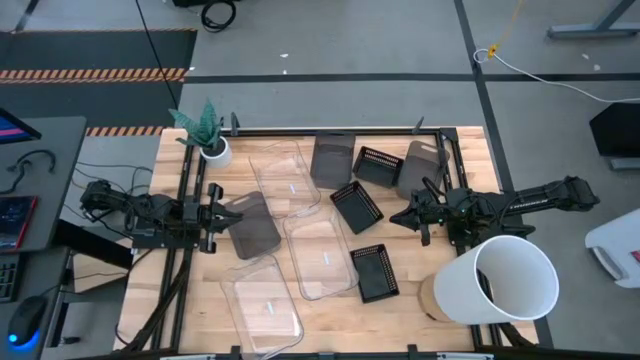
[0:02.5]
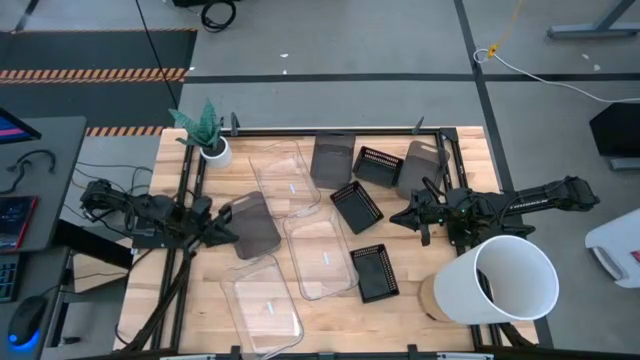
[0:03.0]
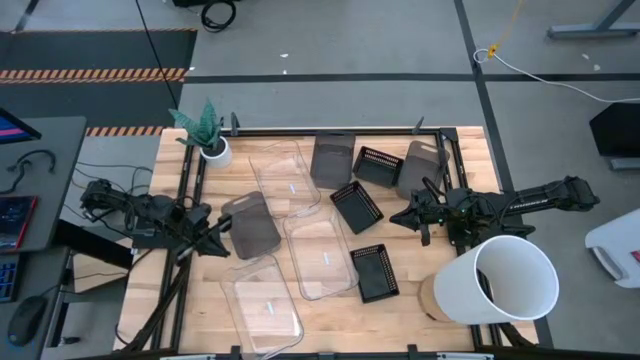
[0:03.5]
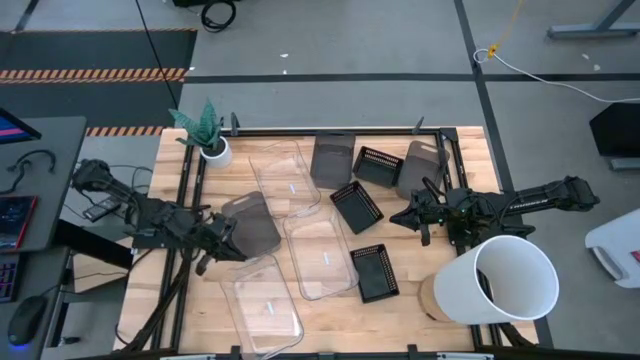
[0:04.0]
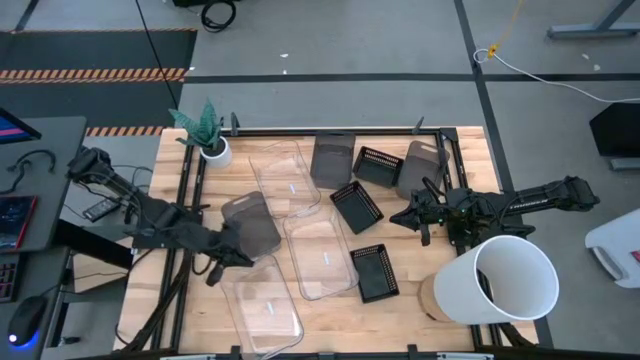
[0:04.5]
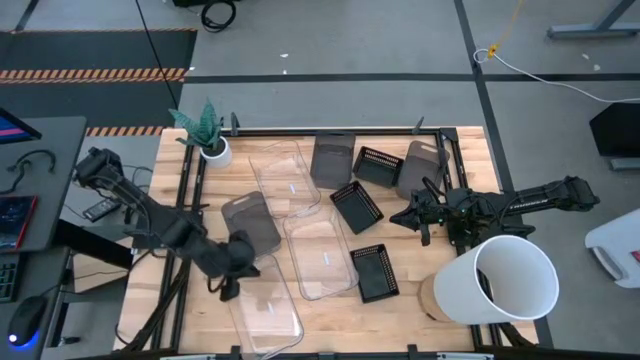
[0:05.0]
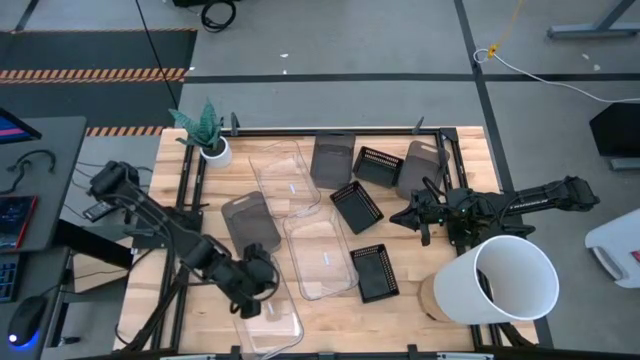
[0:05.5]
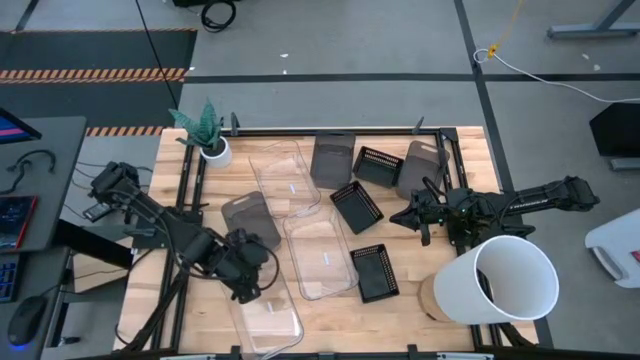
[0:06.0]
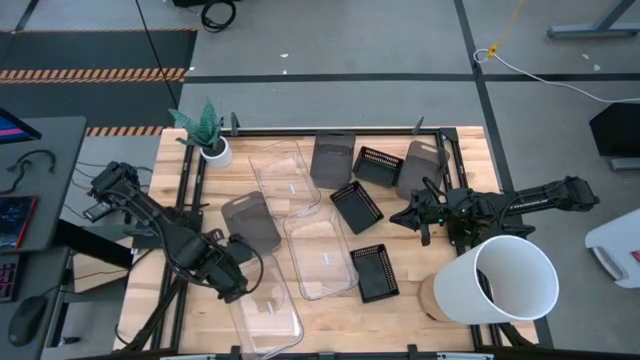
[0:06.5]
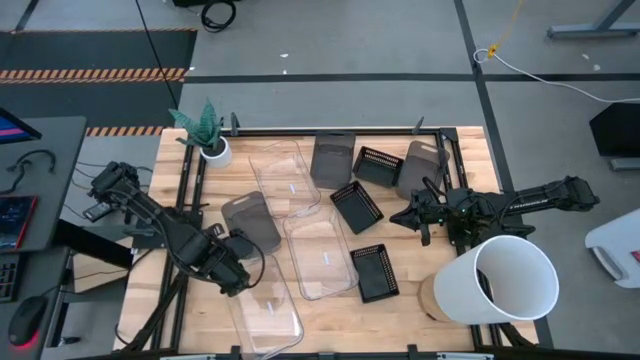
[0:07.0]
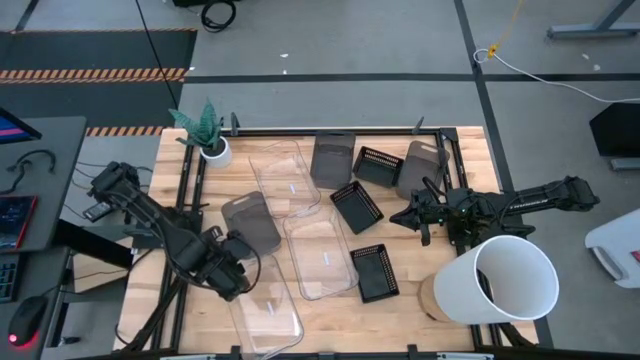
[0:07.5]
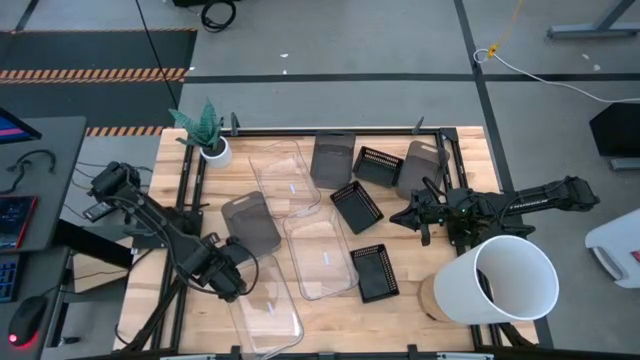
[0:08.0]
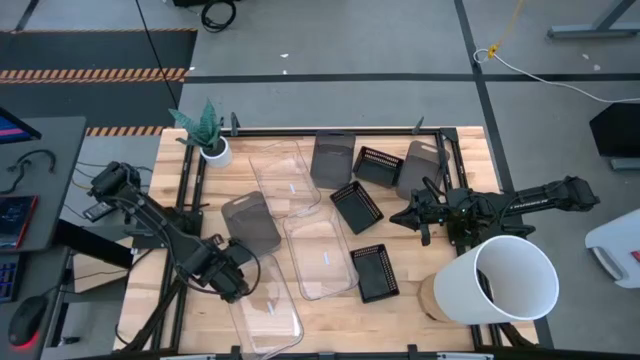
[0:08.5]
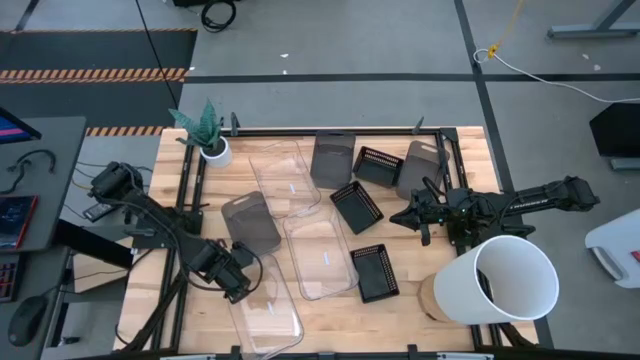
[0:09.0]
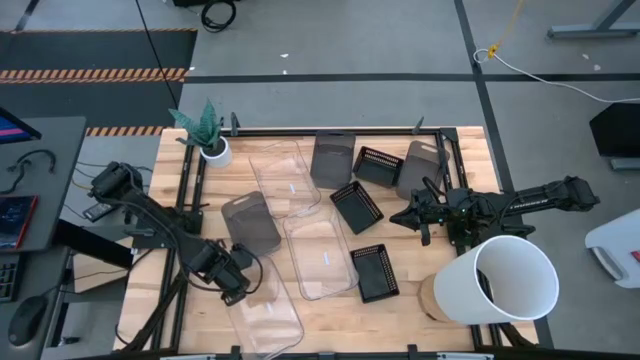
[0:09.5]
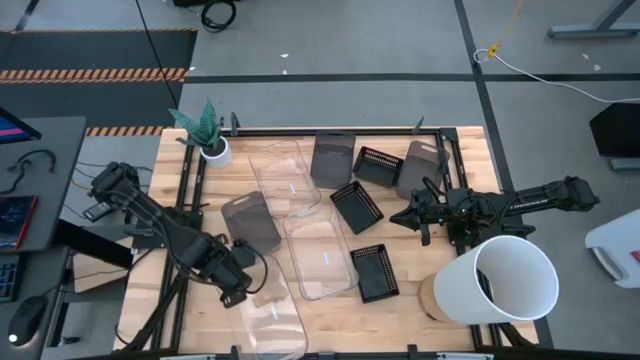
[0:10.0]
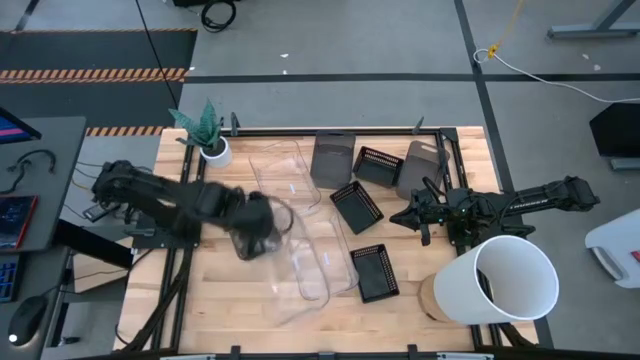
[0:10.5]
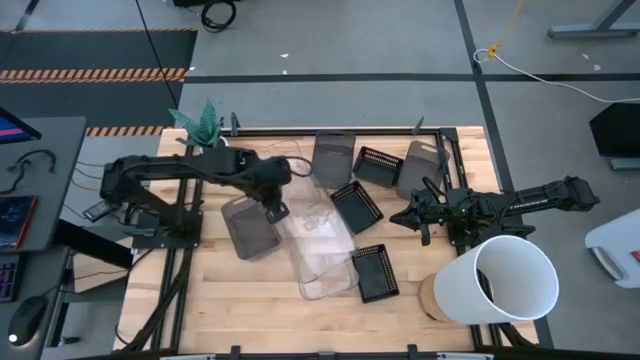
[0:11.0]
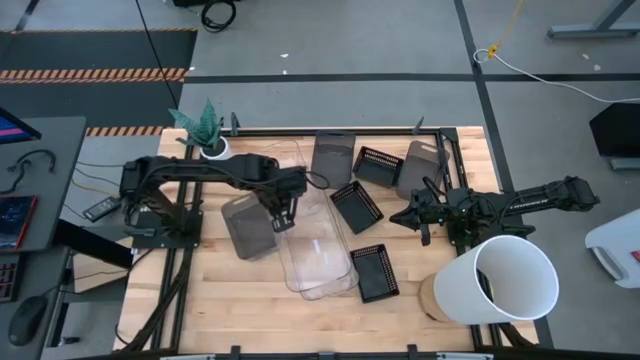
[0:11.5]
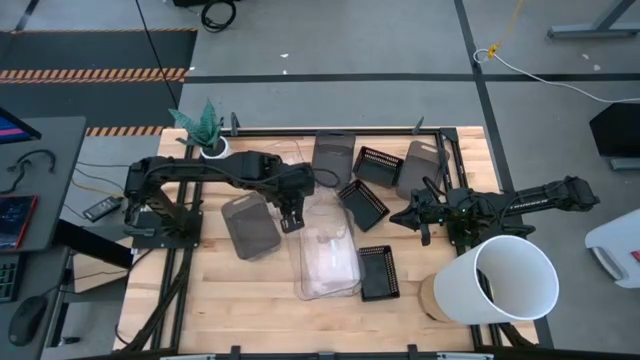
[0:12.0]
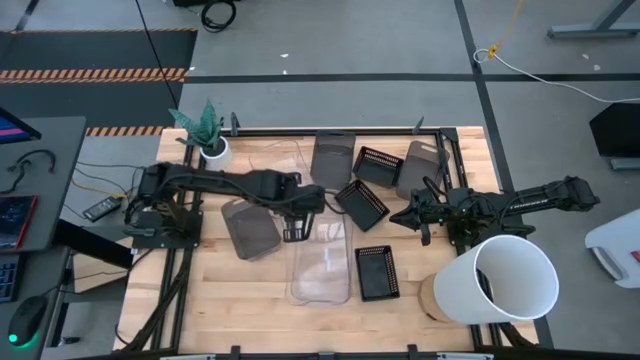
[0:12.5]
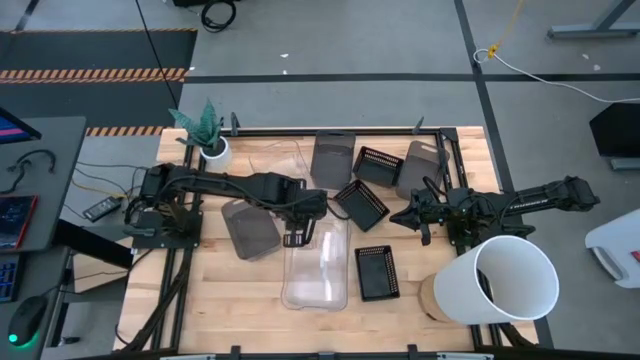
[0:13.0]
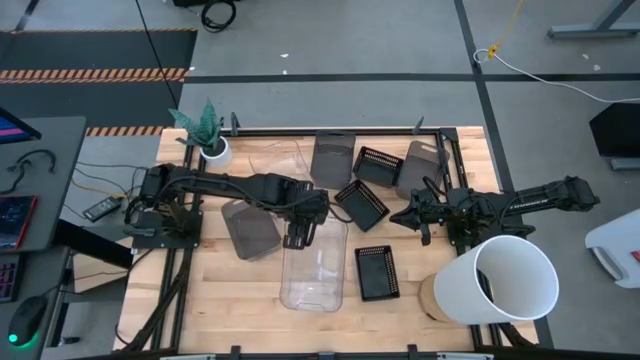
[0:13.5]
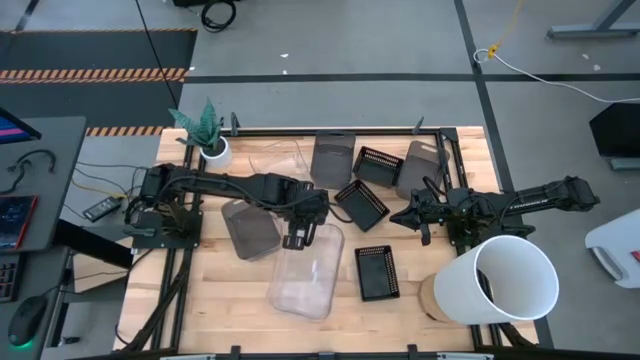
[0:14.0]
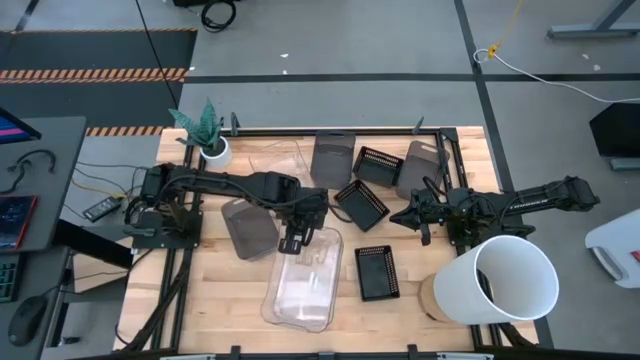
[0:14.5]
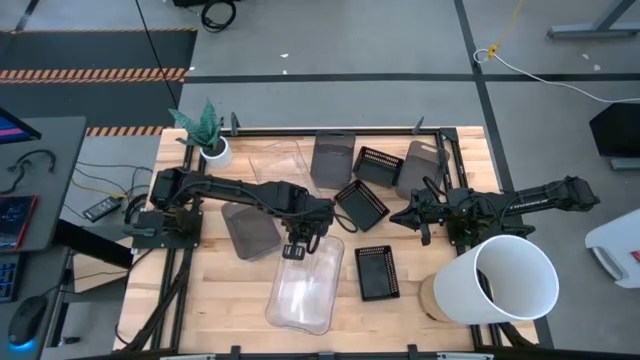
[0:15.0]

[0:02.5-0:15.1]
Stack the bottom transparent bin on top of the middle transparent bin

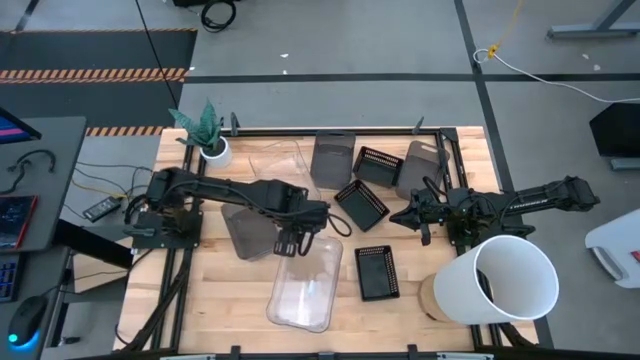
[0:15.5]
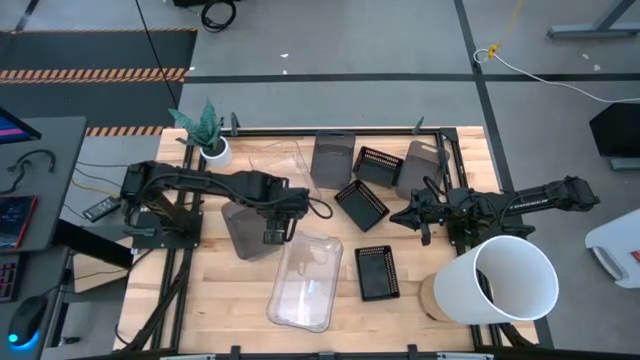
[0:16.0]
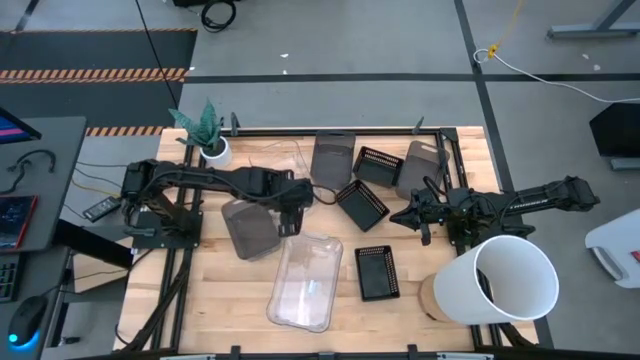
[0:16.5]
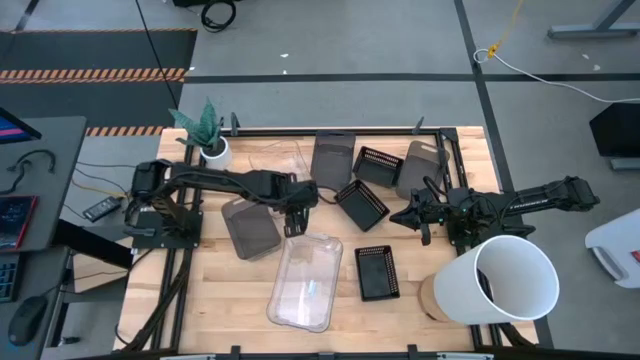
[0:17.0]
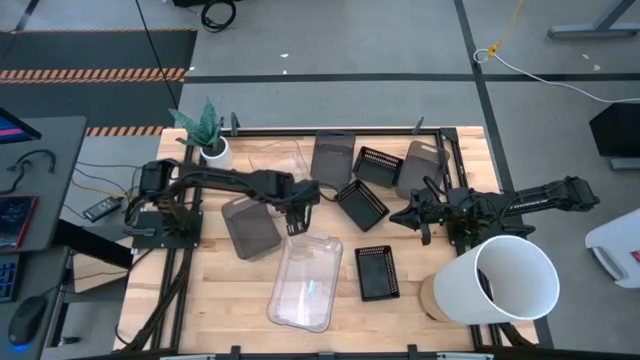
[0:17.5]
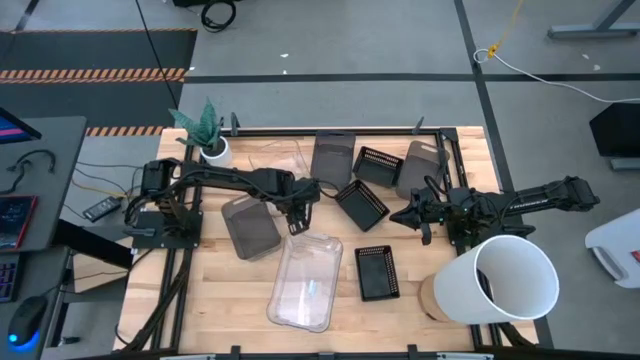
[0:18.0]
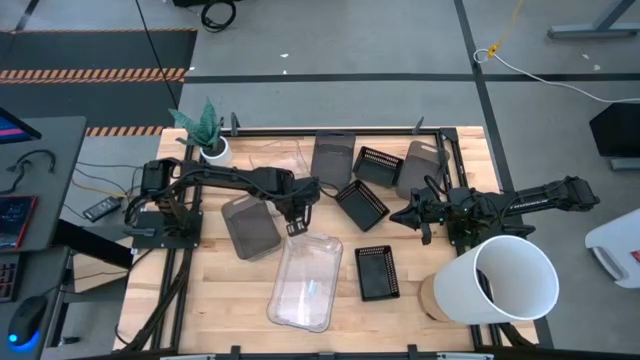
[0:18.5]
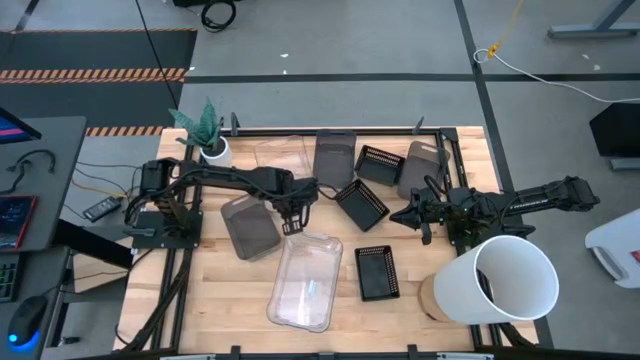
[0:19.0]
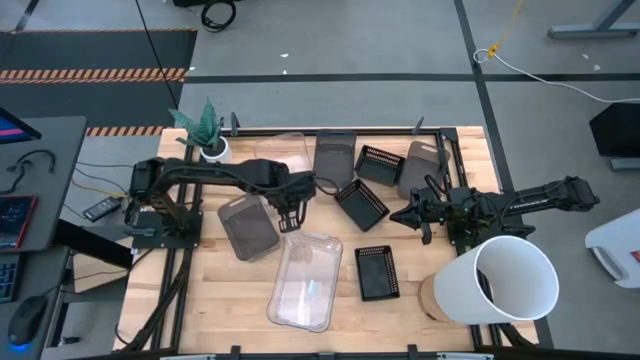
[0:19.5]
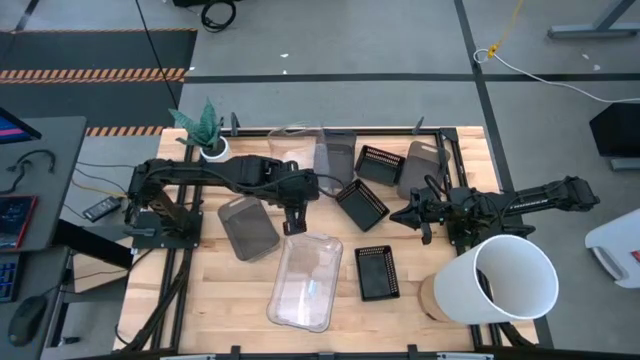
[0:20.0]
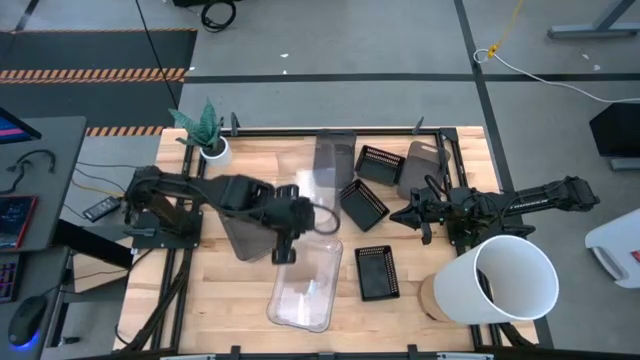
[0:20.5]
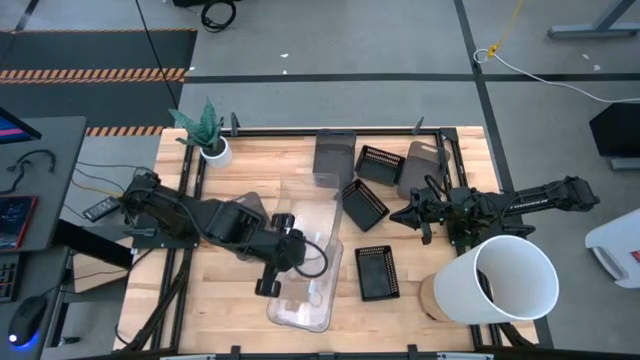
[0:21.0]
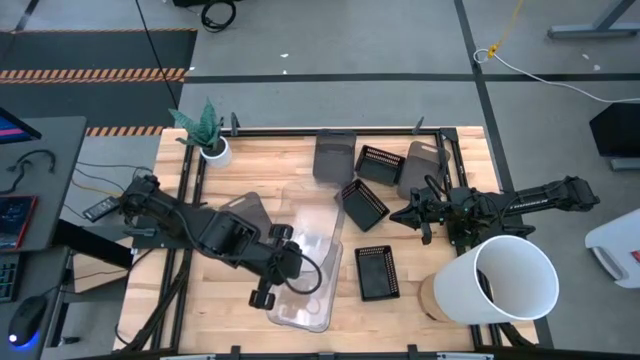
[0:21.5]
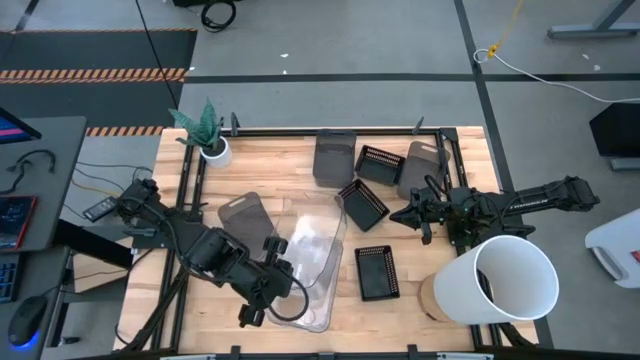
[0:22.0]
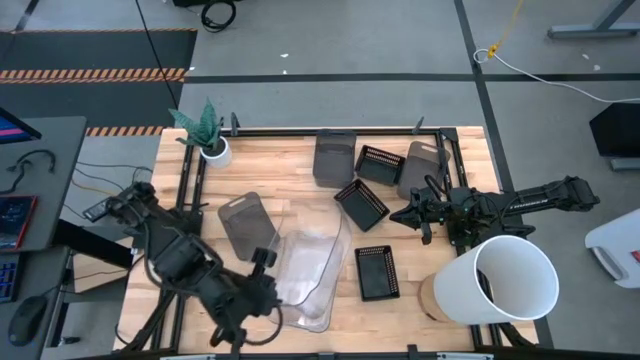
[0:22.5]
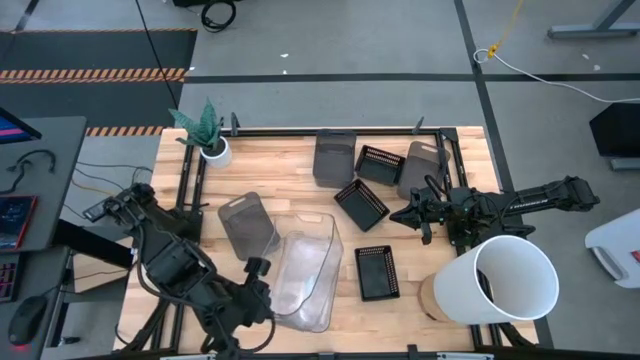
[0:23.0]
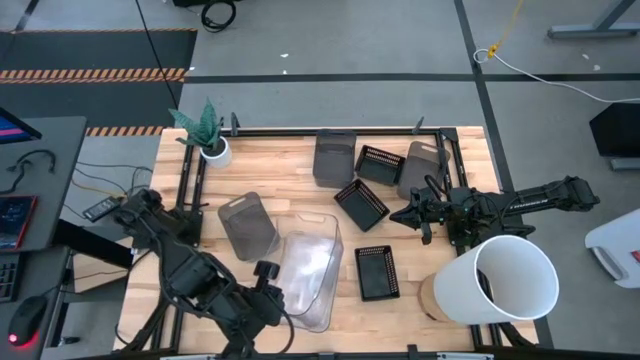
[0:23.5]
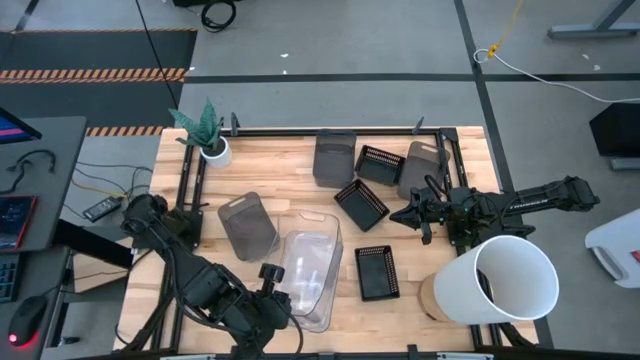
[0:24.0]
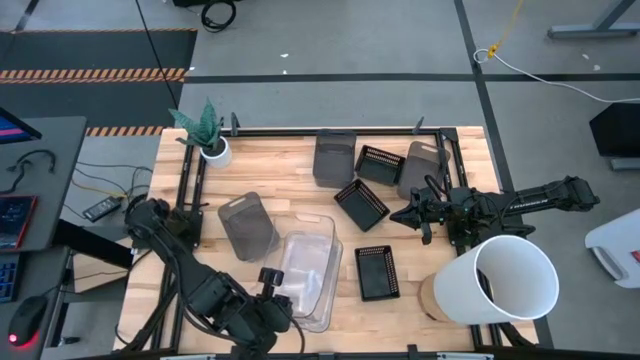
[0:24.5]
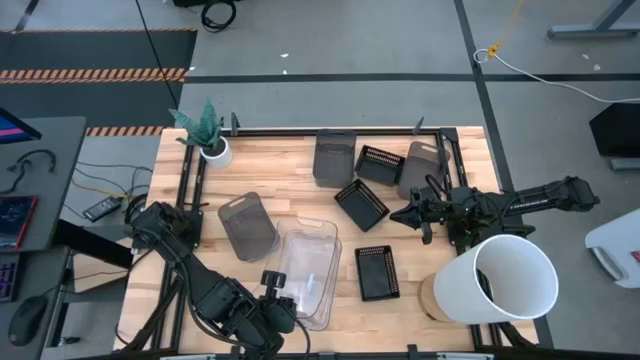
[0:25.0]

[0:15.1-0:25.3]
Stack the top transparent bin on top of the bottom transparent bins
